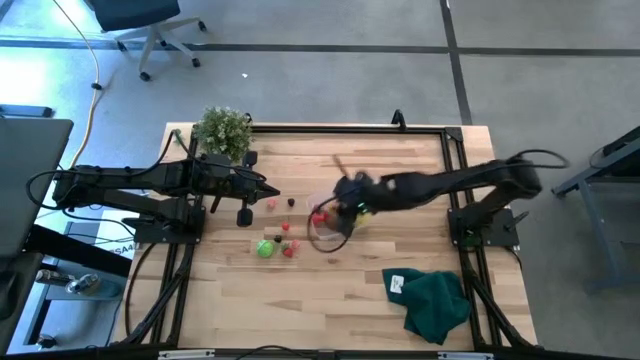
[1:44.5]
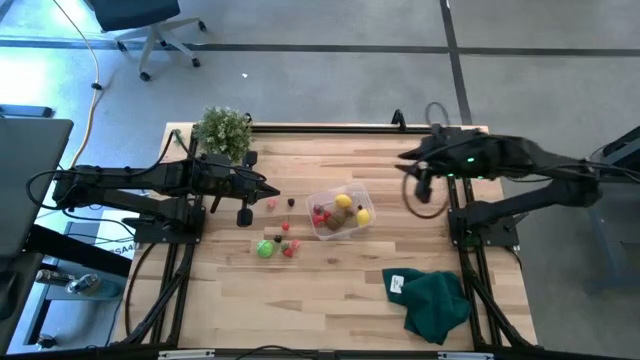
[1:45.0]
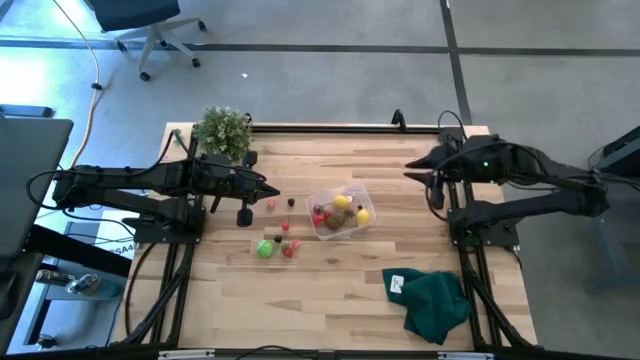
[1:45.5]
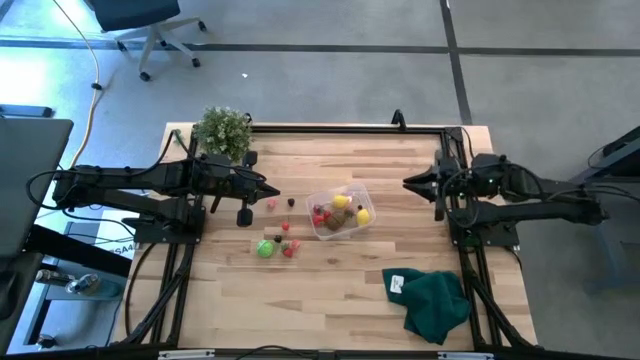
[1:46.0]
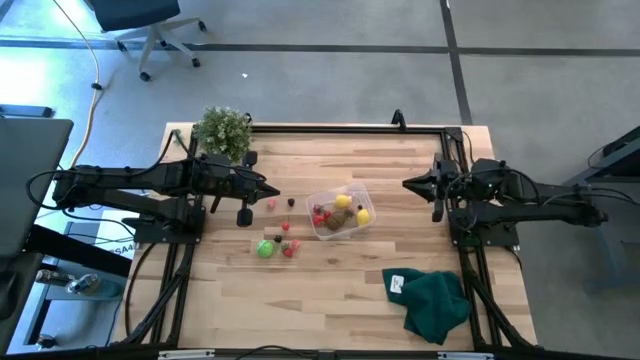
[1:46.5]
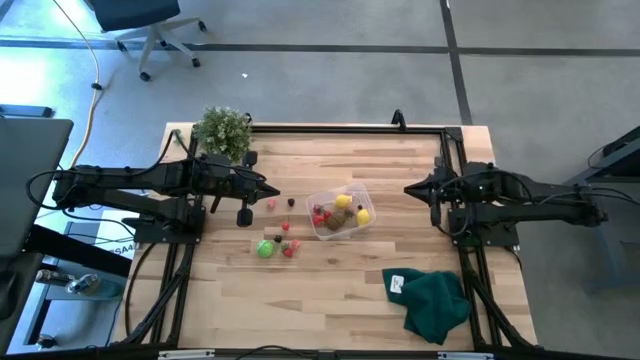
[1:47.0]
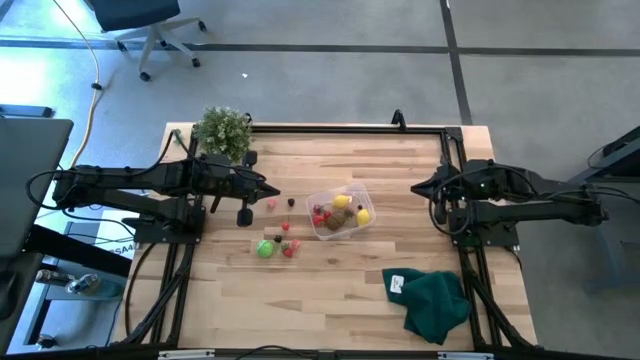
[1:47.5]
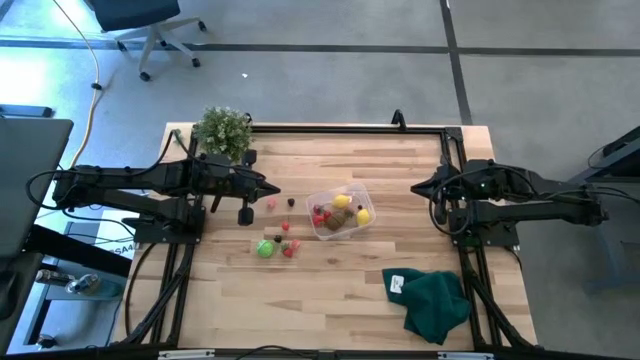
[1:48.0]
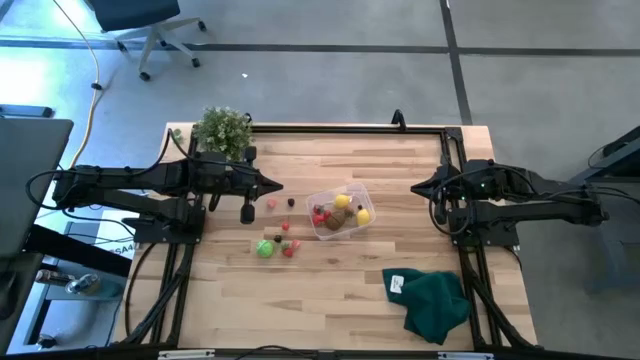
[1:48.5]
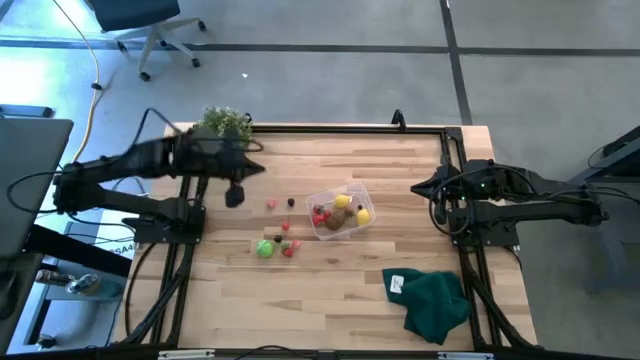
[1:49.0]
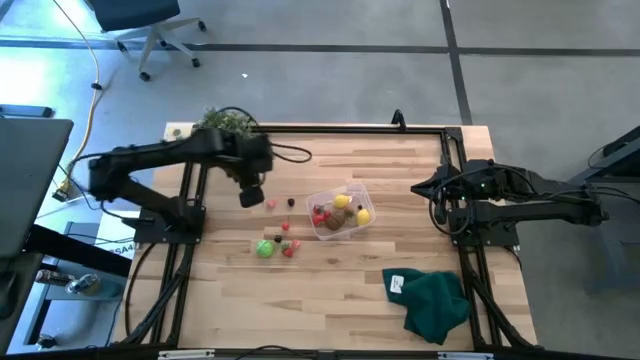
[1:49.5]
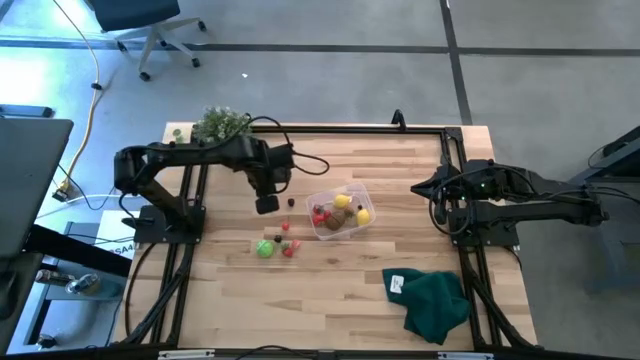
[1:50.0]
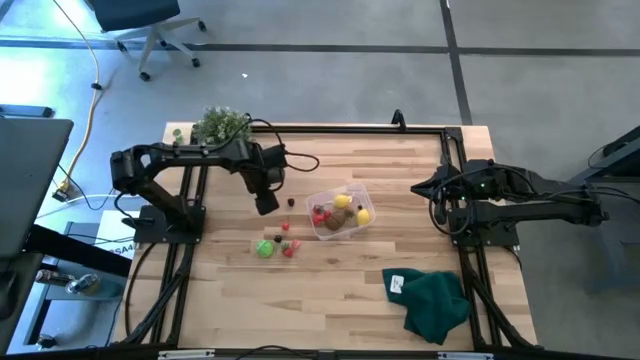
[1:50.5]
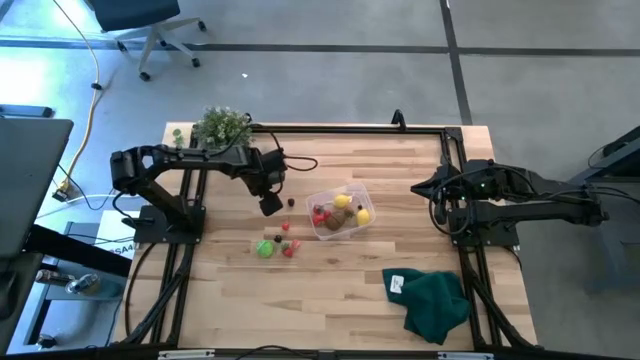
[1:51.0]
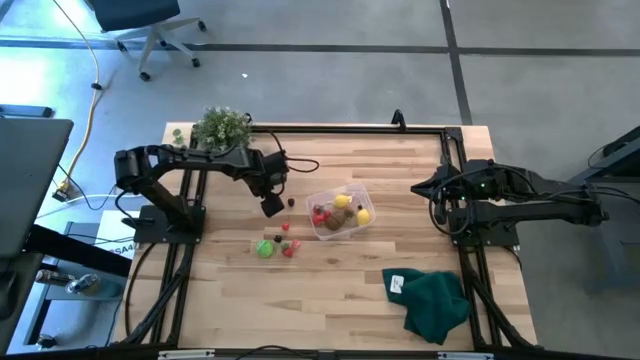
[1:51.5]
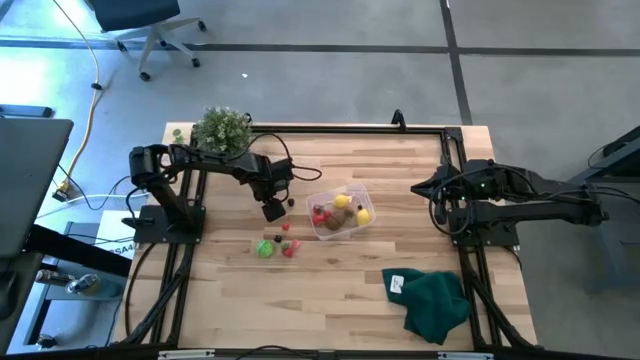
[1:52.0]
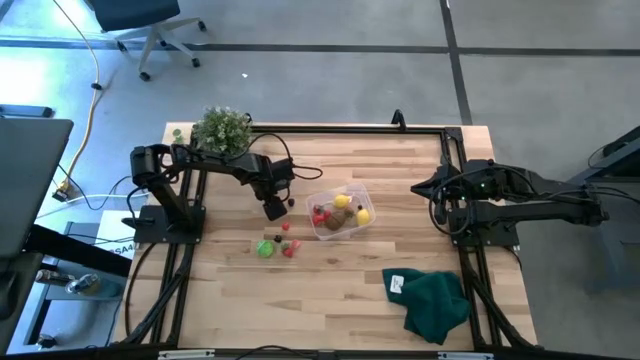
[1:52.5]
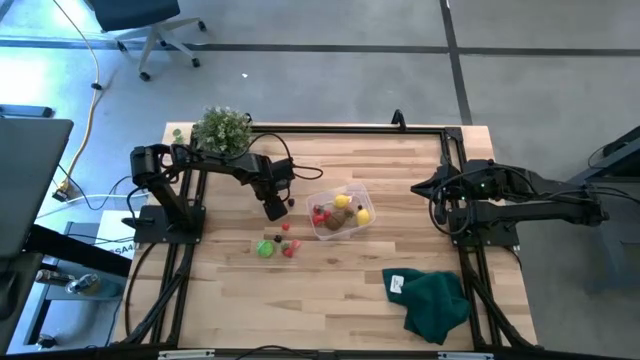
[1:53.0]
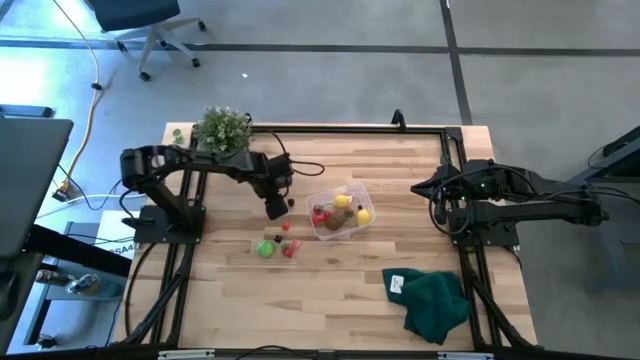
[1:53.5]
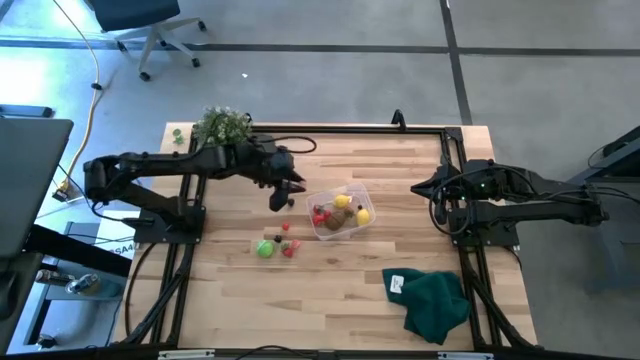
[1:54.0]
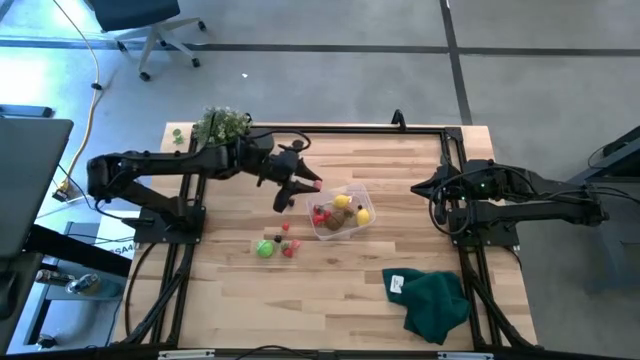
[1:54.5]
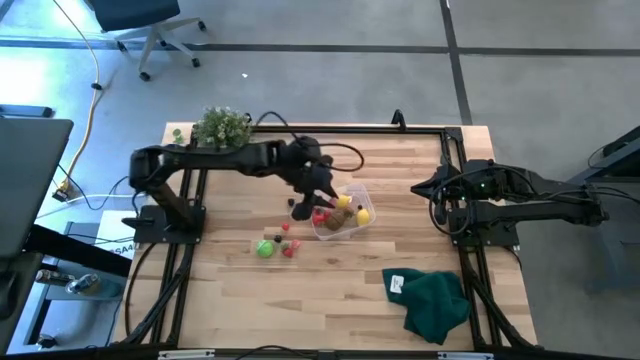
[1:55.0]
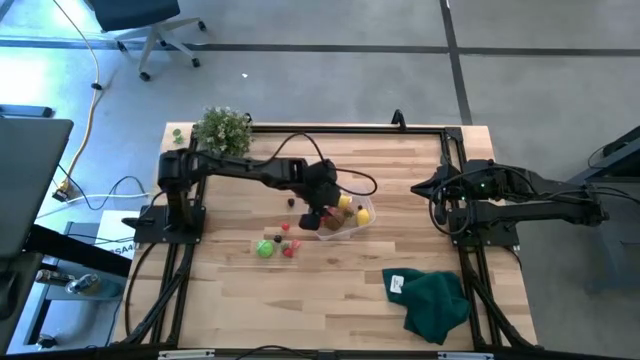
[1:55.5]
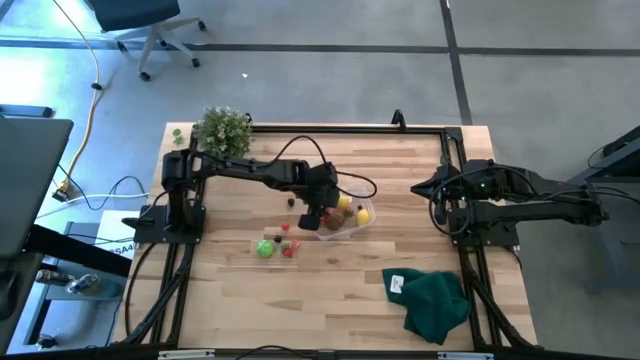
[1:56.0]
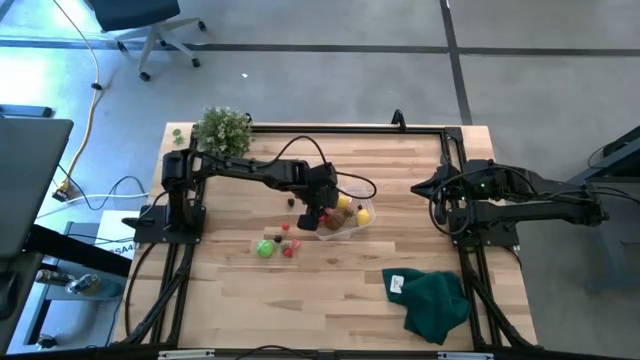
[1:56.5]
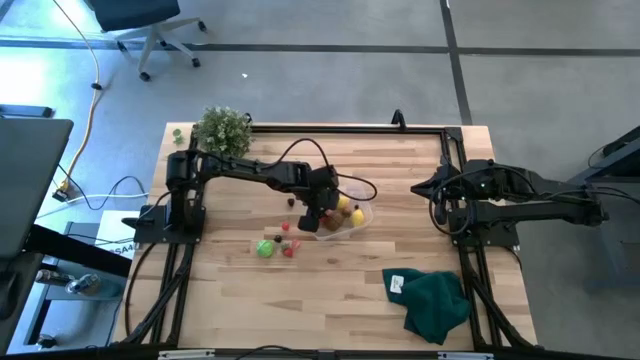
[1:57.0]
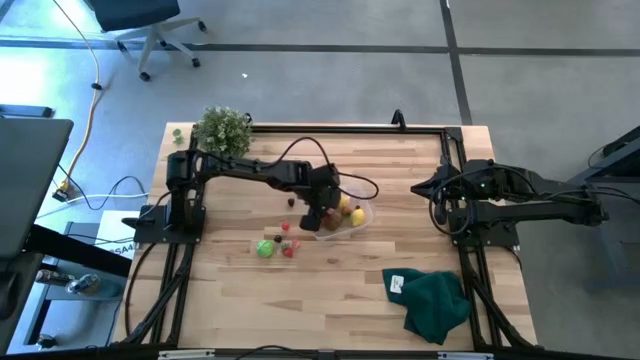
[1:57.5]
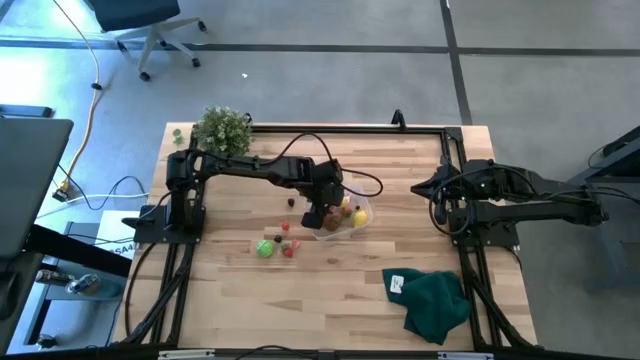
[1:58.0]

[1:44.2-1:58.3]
Task: Pick and placing Produce into tupperware
Put the pink peach into the transparent bin

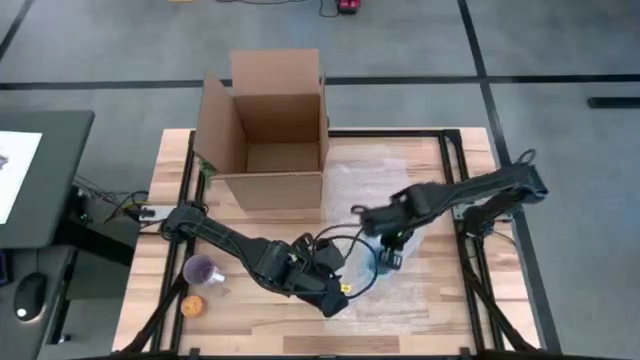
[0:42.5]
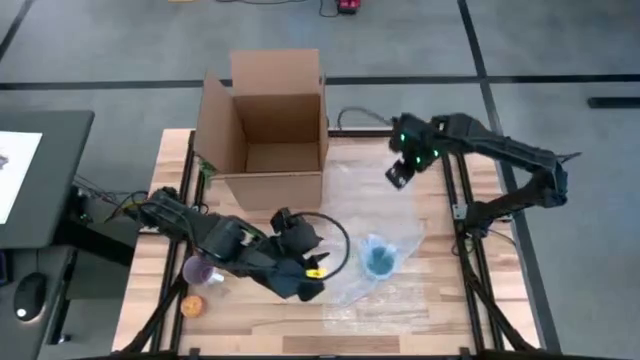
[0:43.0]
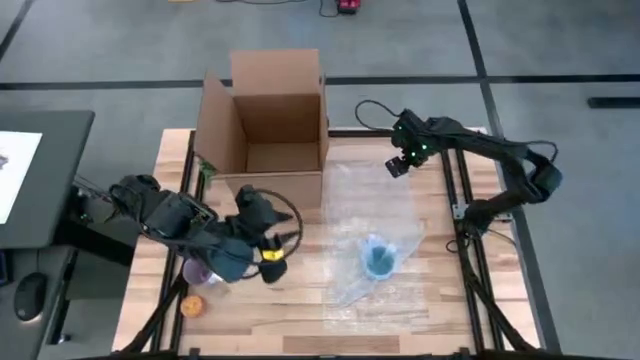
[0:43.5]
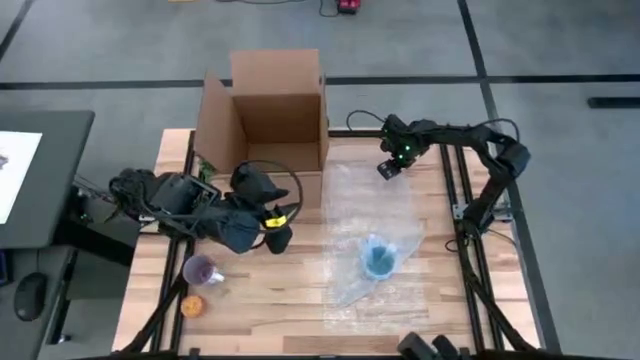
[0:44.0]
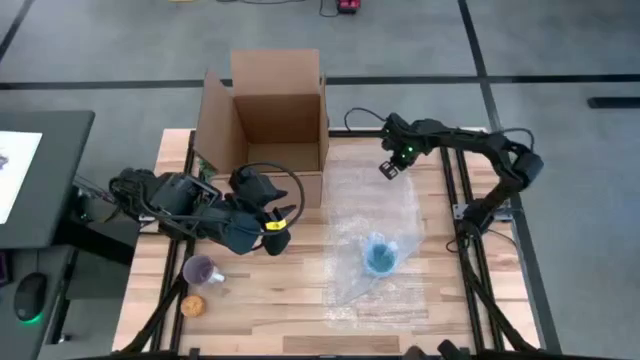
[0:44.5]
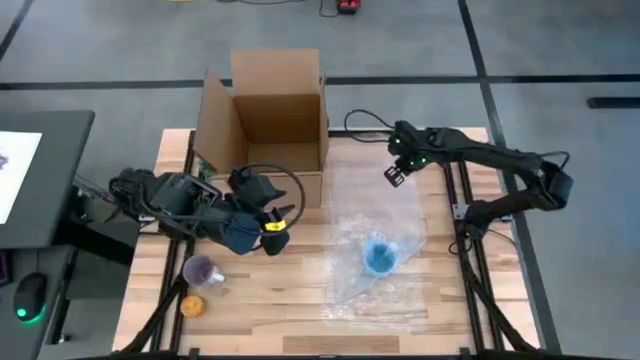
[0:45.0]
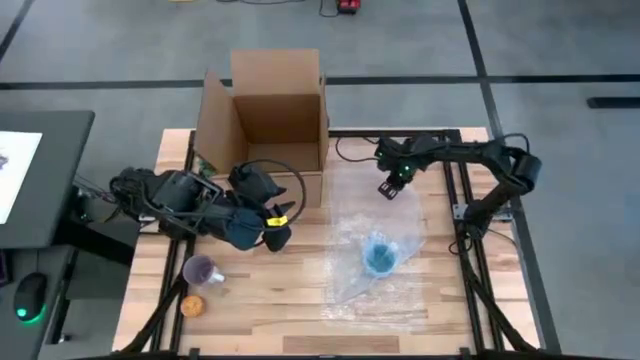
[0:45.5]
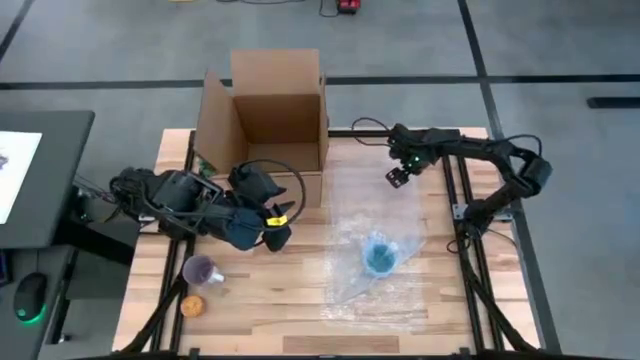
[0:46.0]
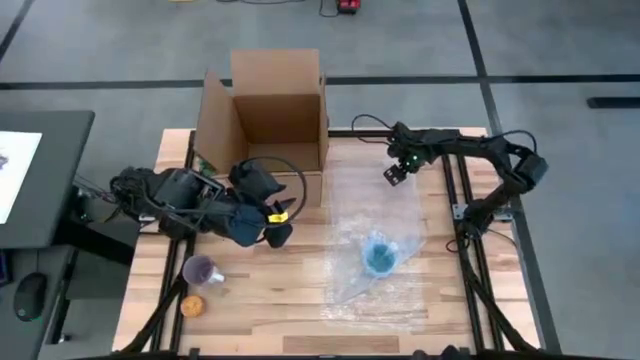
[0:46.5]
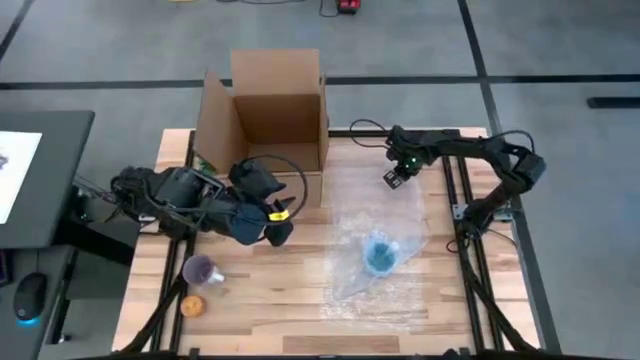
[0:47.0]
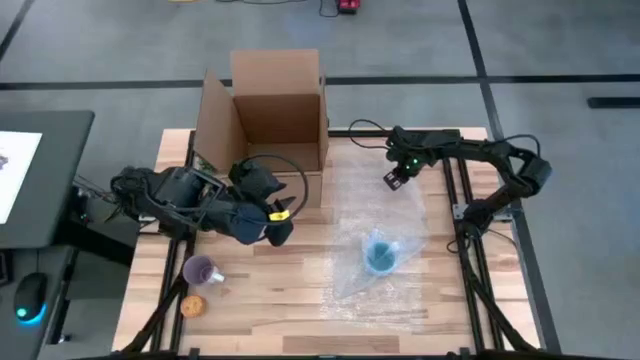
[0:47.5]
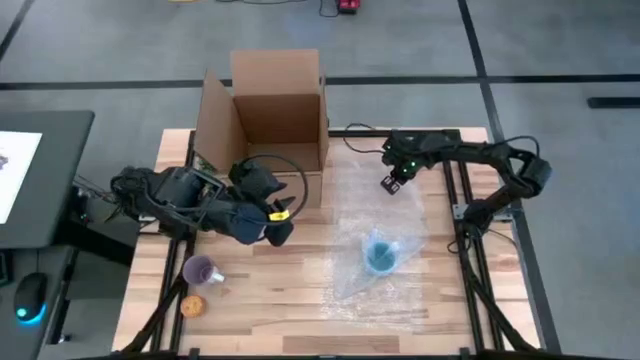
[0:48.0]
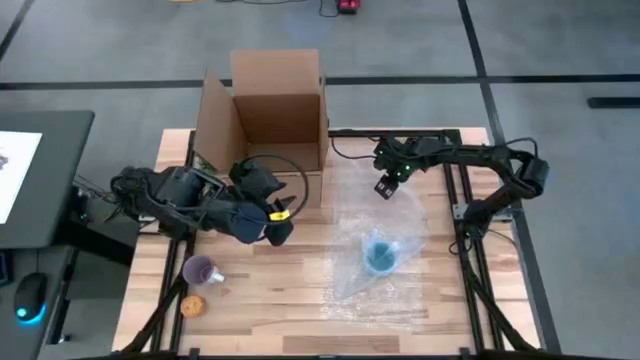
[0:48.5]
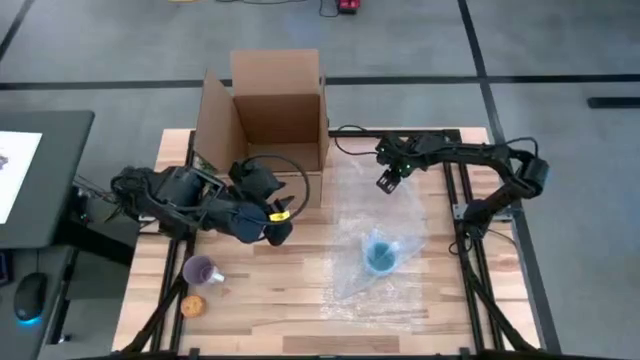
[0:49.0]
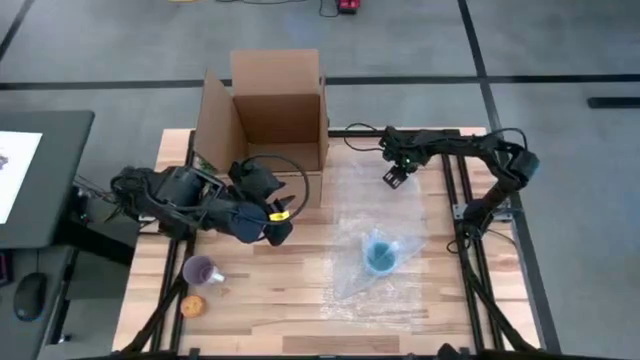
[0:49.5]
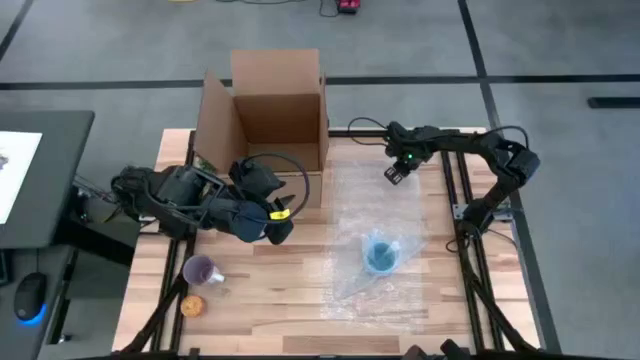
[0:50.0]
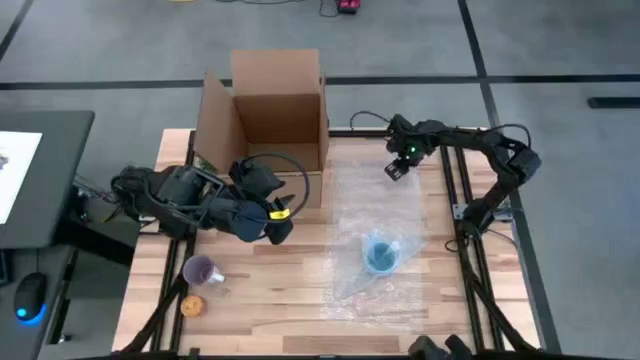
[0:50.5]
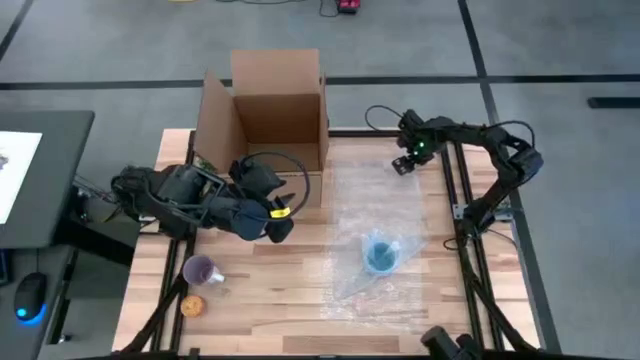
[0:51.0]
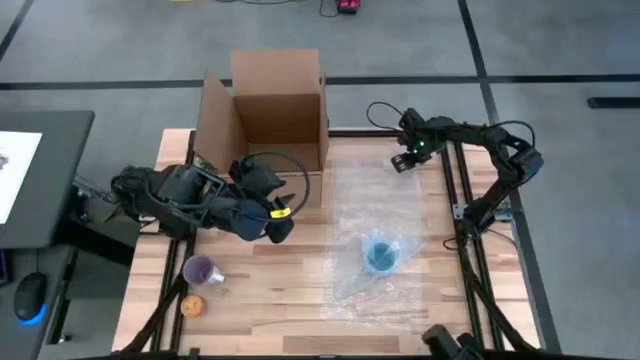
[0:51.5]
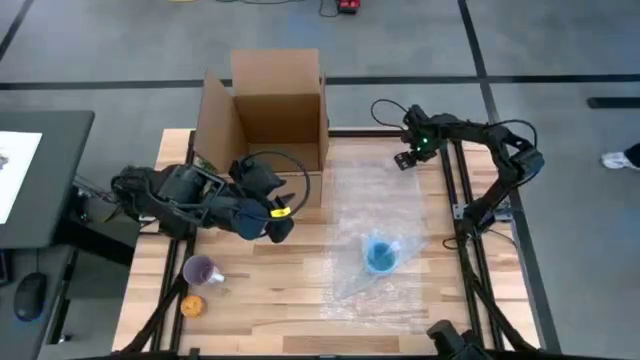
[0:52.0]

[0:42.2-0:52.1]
Task: wrap mug
Wrap the blue mug with the bubble wrap
